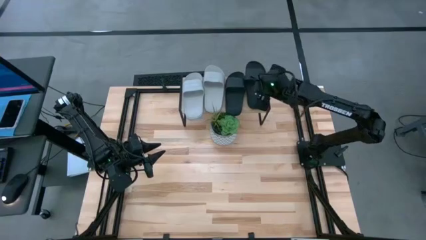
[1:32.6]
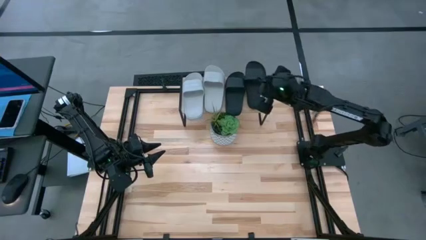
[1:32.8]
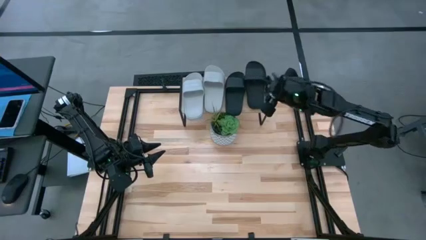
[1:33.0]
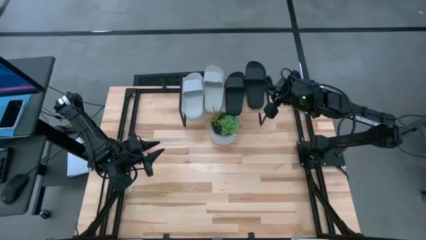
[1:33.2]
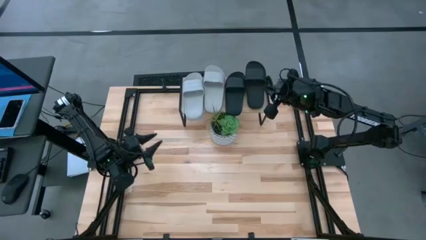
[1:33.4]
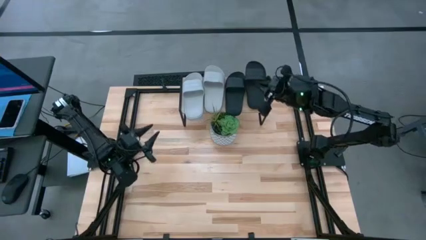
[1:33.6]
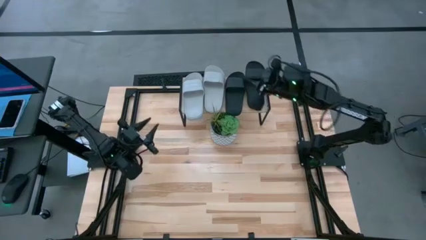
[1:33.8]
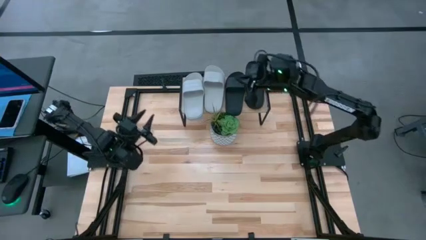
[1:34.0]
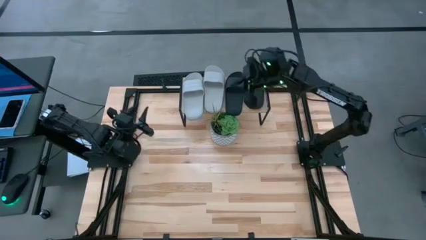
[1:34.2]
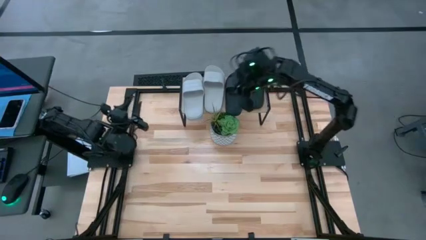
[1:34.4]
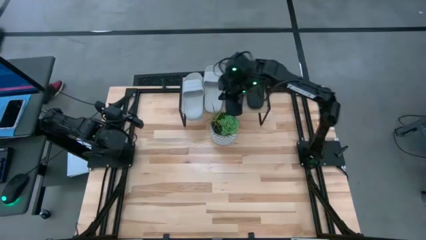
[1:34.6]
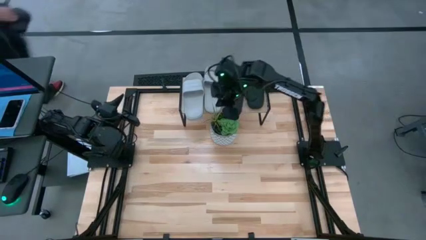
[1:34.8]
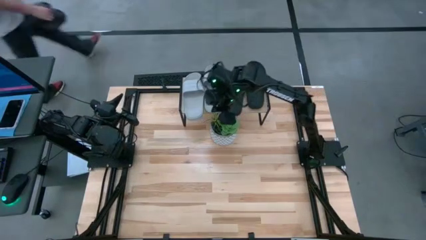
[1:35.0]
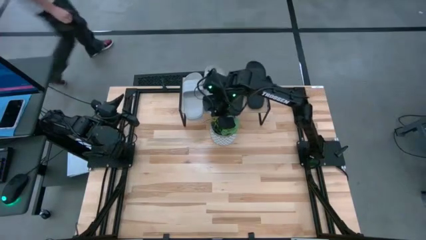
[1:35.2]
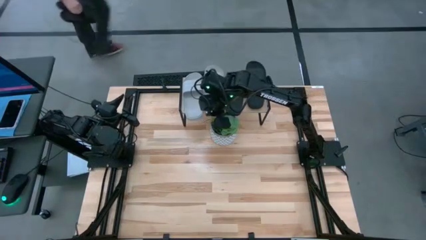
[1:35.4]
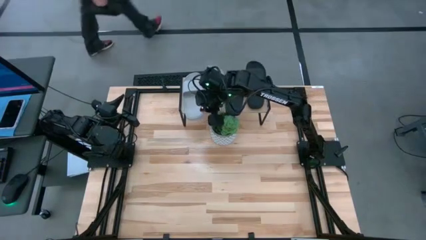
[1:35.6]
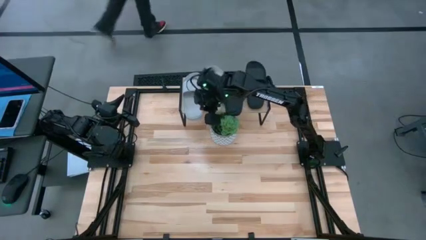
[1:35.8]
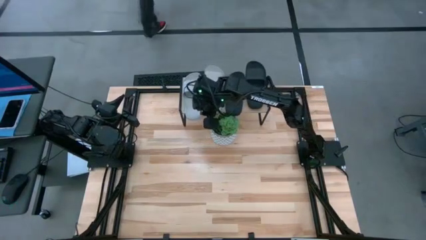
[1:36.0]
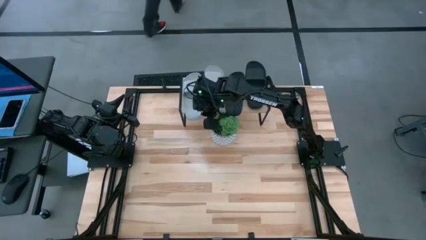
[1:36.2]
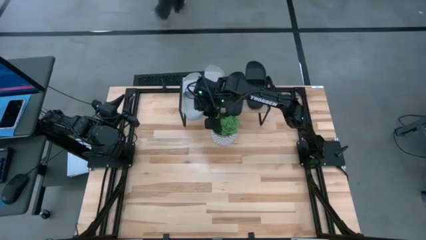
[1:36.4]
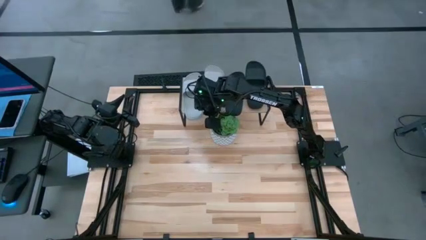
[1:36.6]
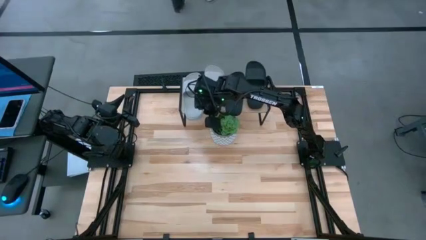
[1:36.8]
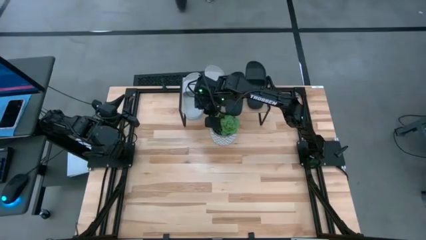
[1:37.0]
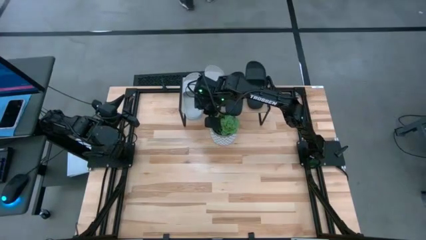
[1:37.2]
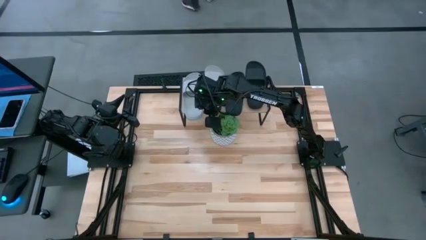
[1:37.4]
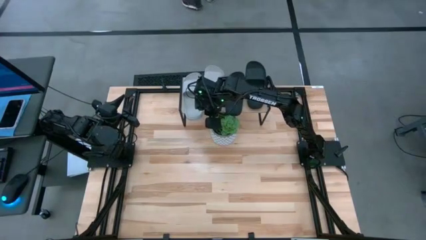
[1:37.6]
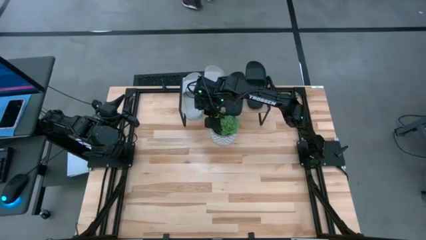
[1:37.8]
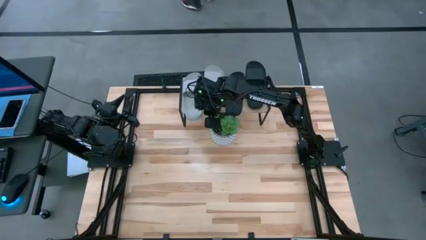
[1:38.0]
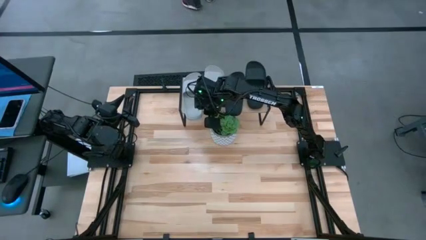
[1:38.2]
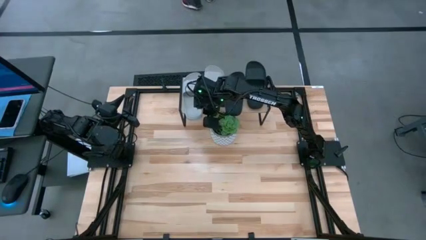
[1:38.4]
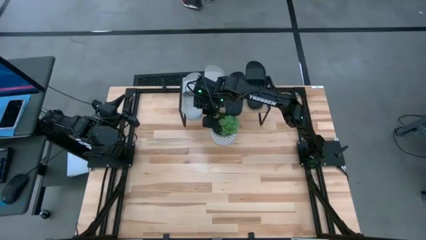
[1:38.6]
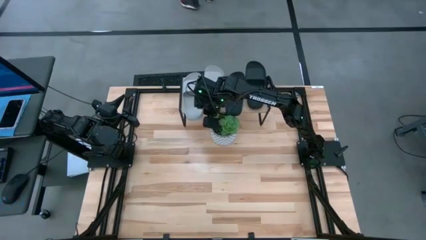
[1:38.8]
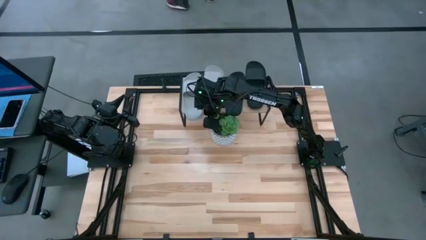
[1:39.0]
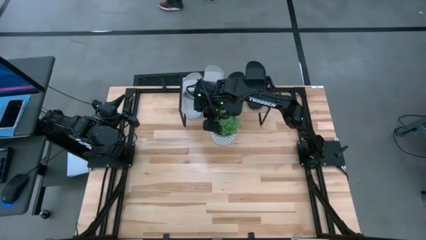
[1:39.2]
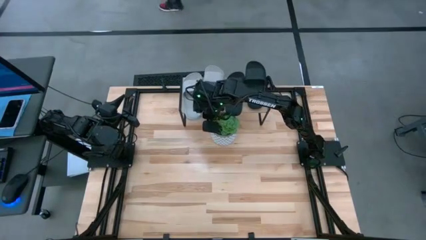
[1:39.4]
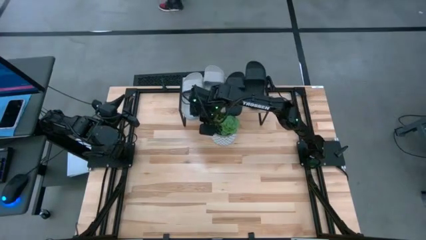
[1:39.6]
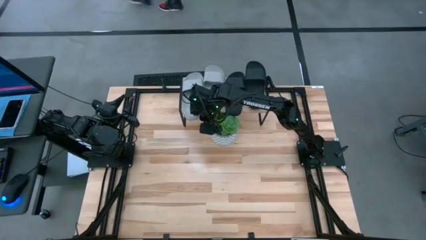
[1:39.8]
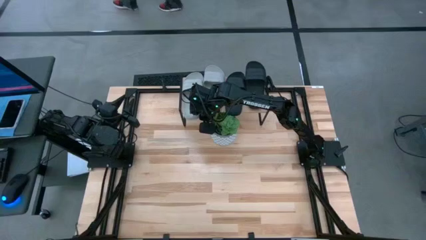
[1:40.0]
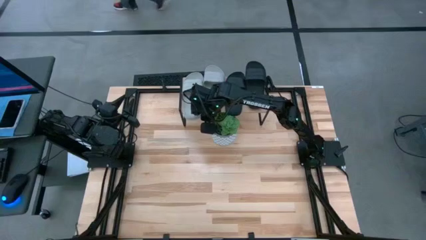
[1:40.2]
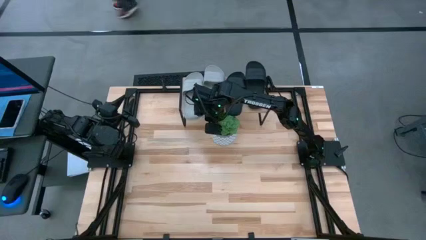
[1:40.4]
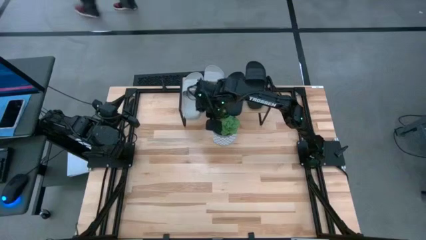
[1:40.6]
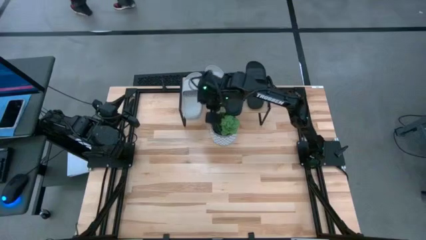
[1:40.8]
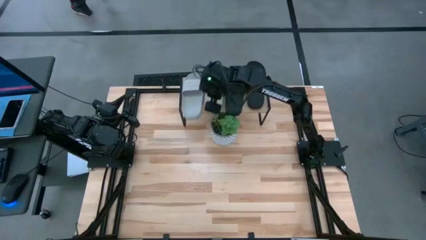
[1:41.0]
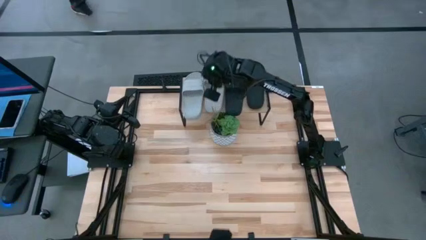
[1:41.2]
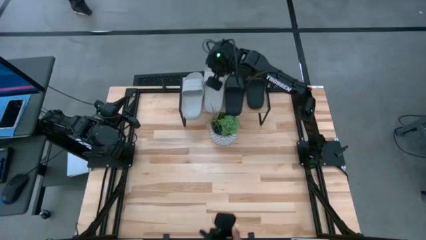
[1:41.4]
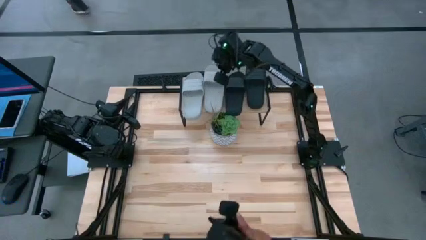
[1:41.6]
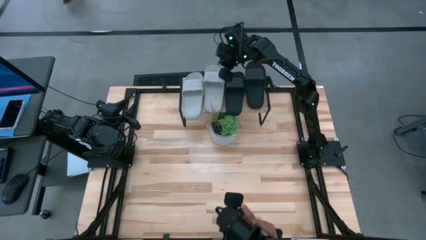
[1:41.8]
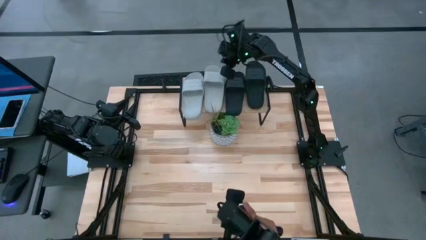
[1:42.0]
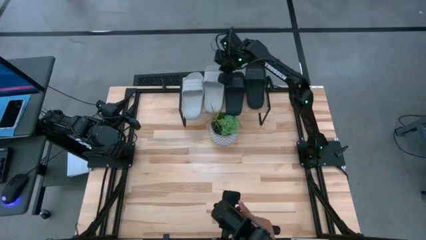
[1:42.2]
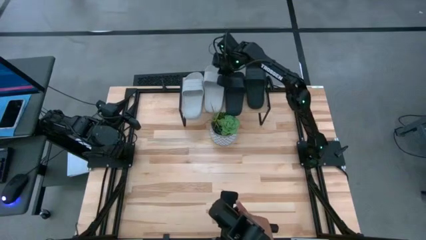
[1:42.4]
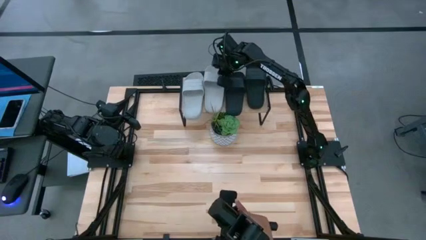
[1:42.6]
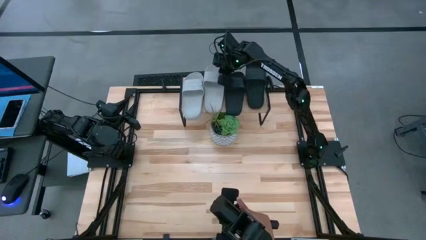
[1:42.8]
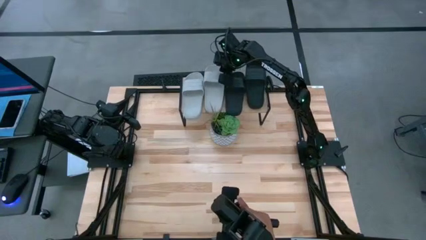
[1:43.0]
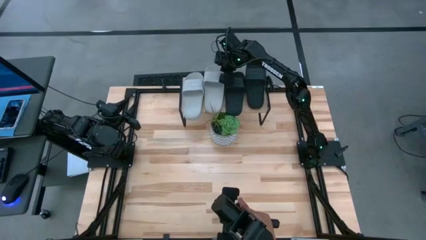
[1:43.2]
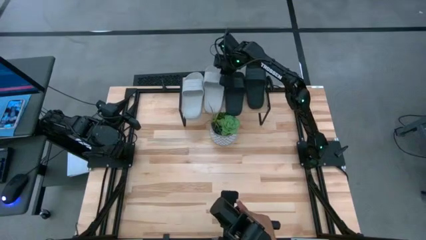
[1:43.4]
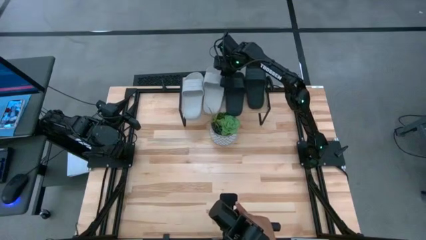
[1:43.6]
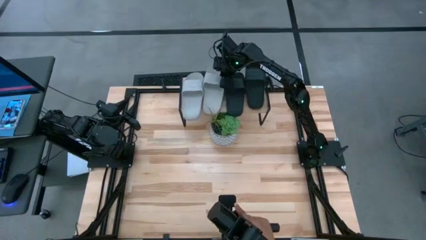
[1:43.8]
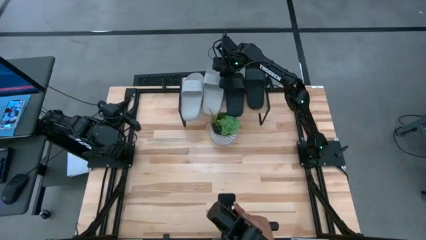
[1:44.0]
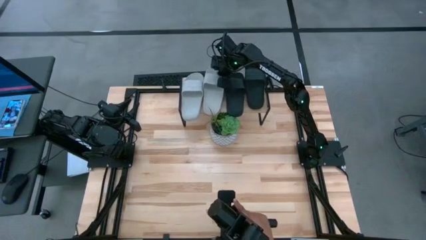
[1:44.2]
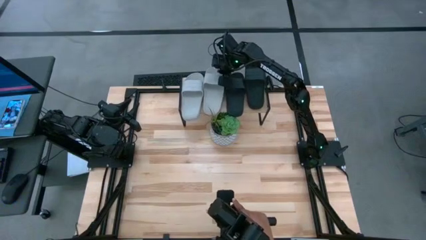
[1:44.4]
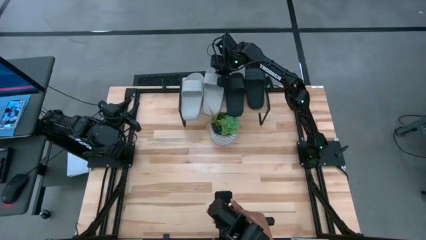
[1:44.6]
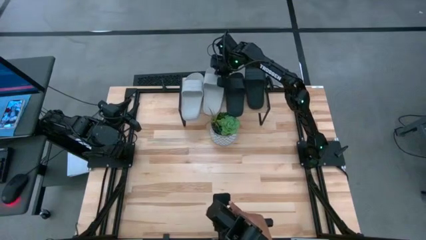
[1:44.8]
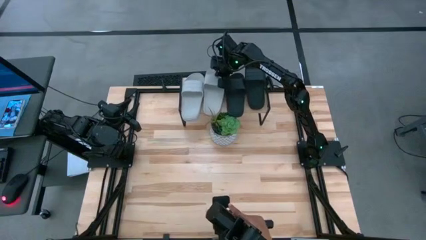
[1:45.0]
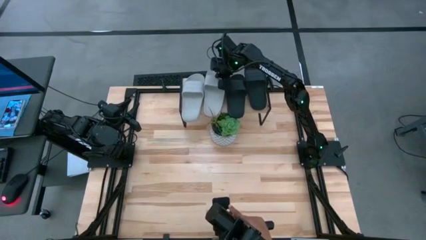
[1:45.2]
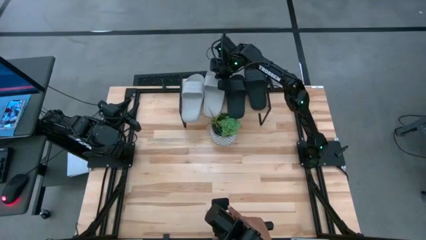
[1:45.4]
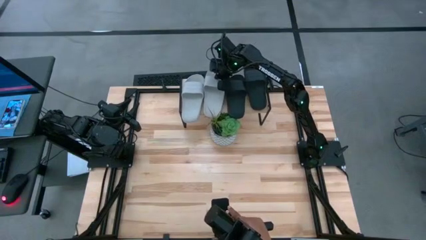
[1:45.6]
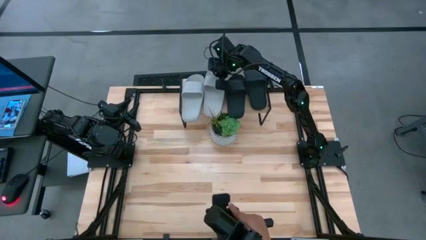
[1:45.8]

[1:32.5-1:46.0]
Task: Pick and place slides into the shelf
Adjust the slides on the shelf

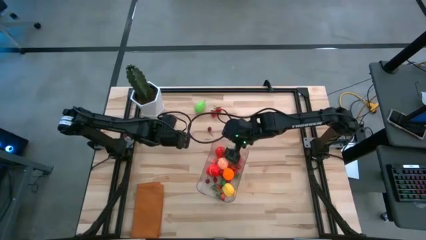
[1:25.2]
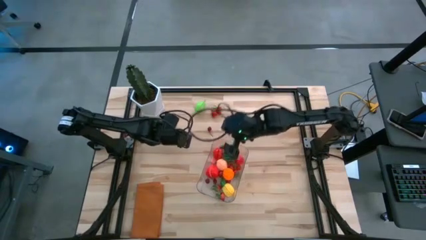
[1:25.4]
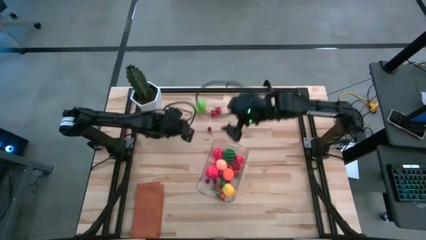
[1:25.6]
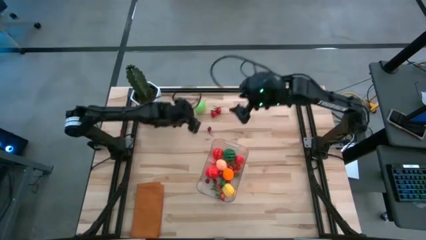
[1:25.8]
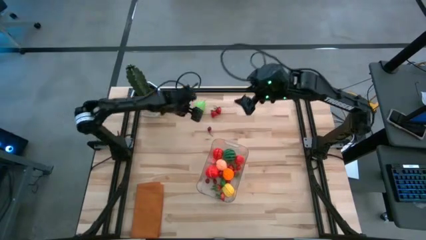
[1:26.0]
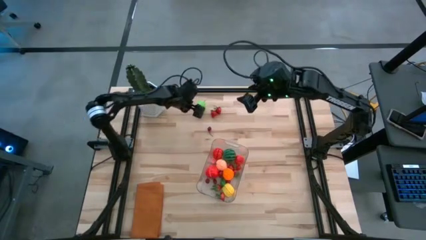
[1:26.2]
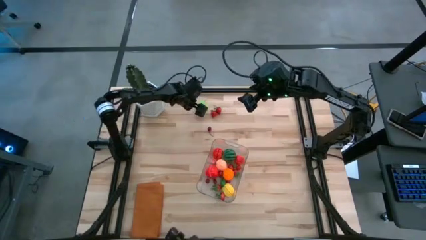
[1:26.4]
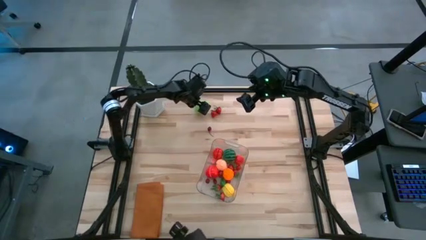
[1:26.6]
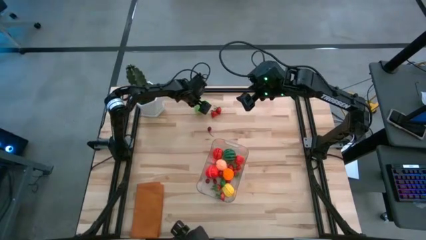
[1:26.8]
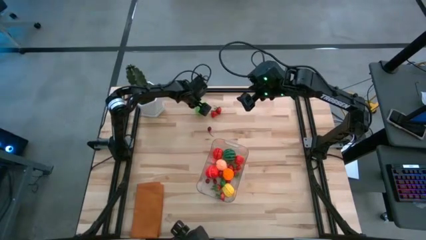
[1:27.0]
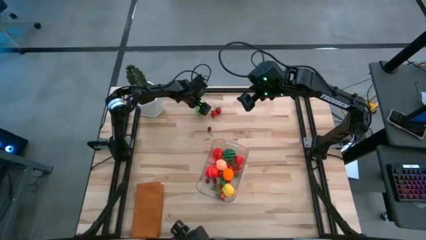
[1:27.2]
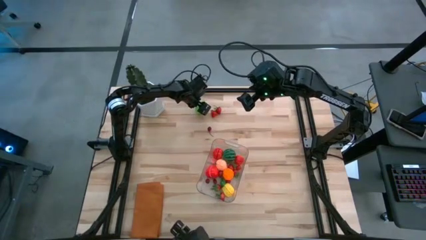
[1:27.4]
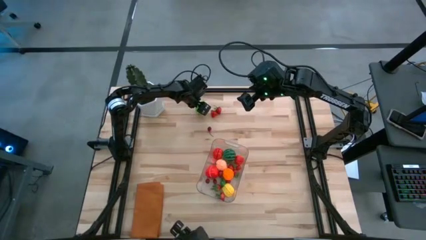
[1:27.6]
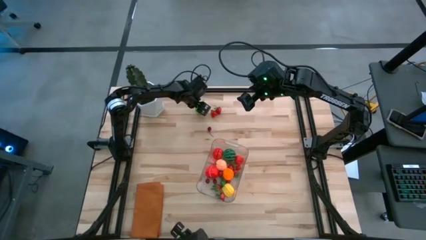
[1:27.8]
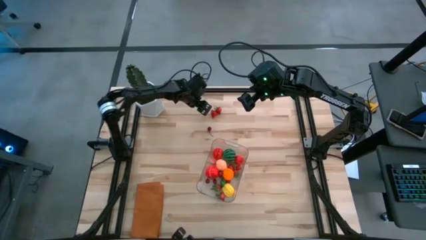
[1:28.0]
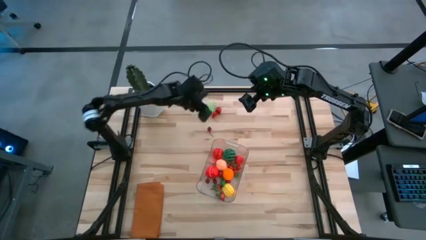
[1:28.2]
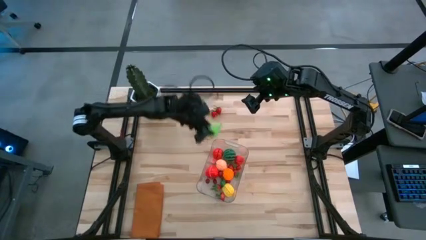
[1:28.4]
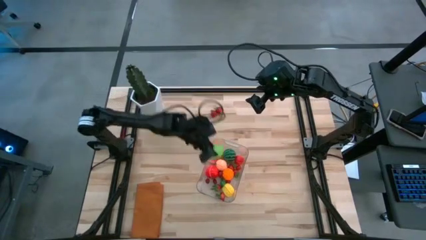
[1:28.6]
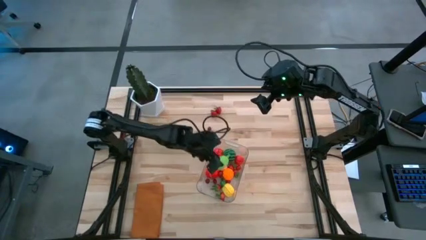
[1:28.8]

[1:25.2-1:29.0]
Task: Pick and placing Produce into tupperware
Put the light green melon into the transparent bin
